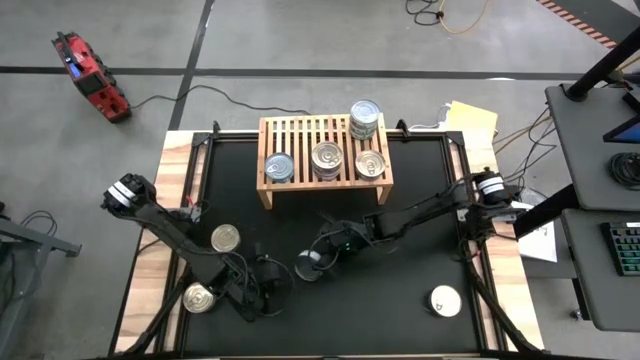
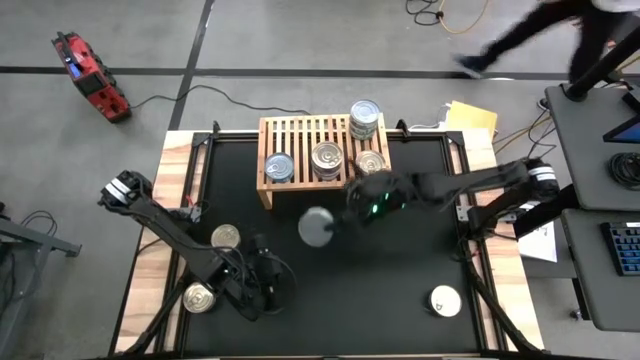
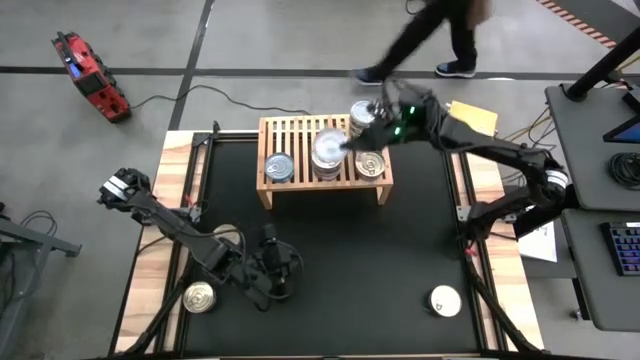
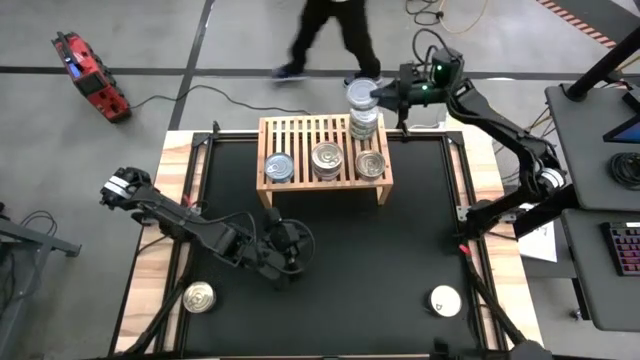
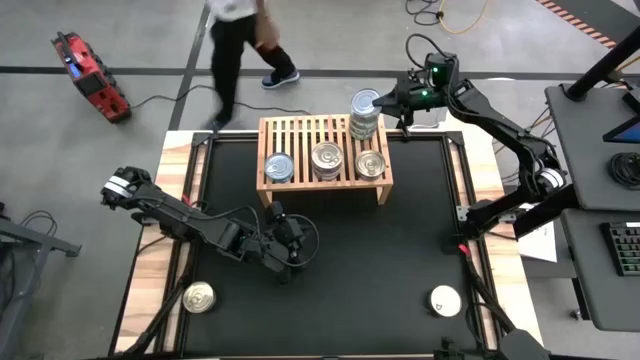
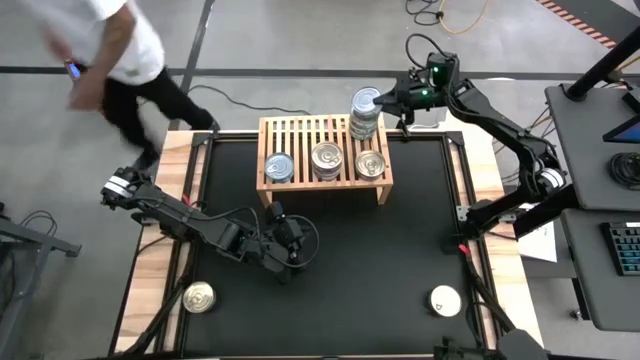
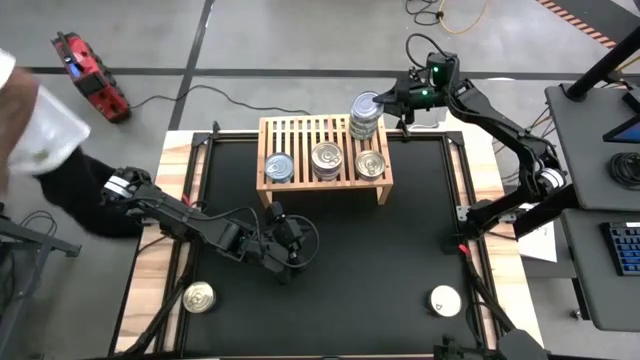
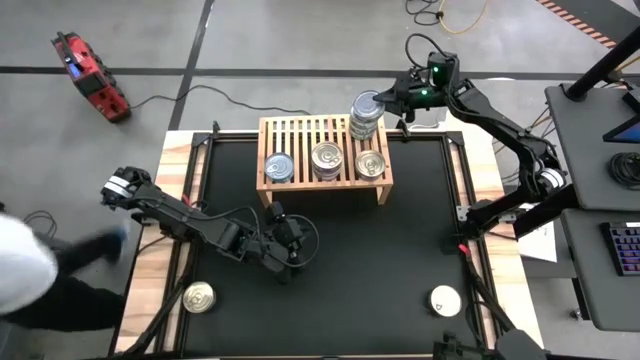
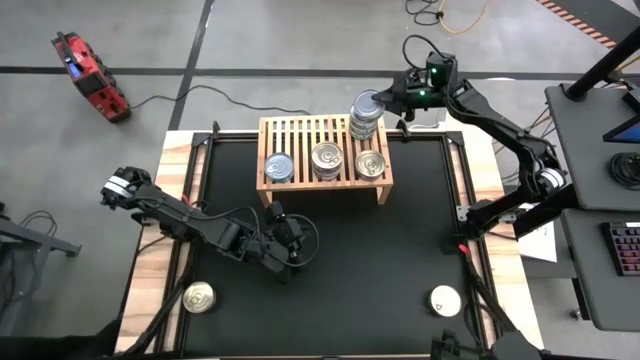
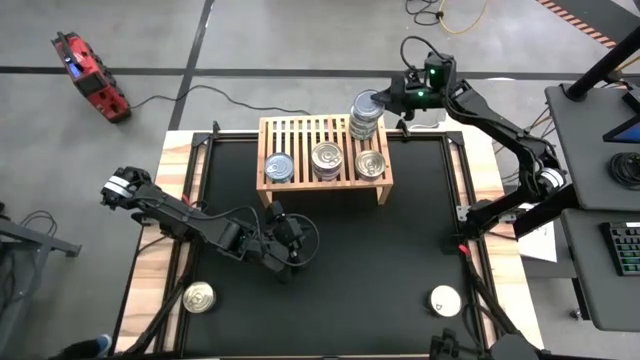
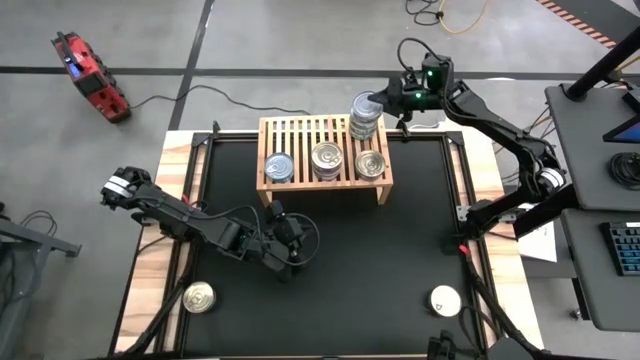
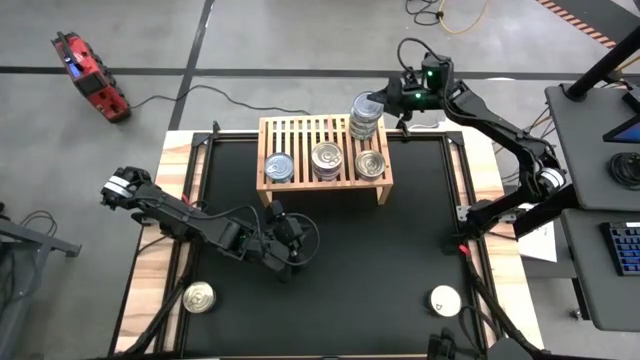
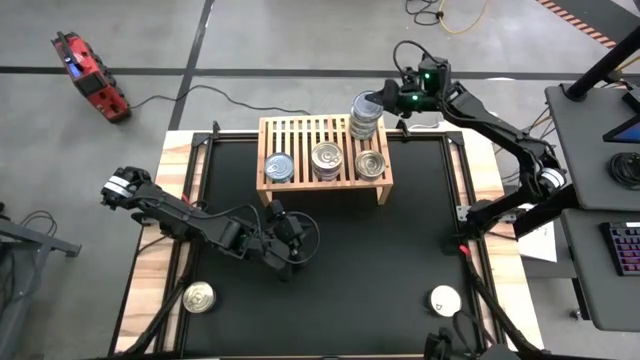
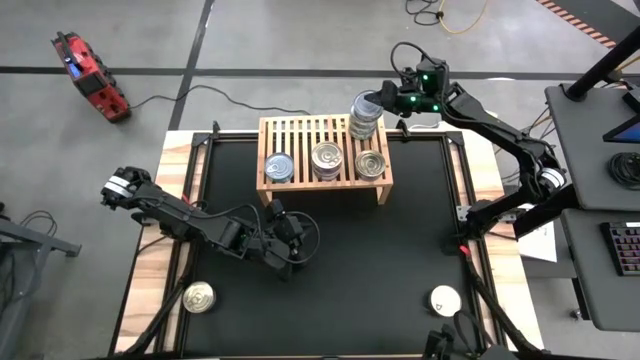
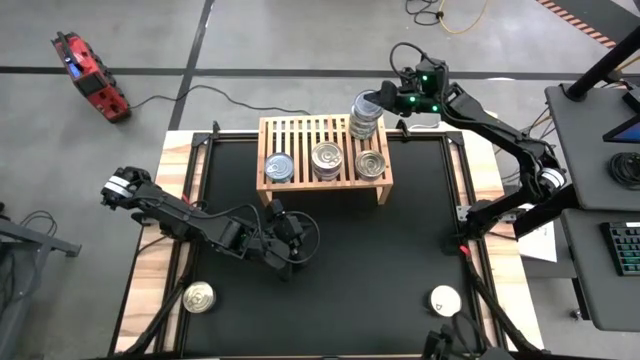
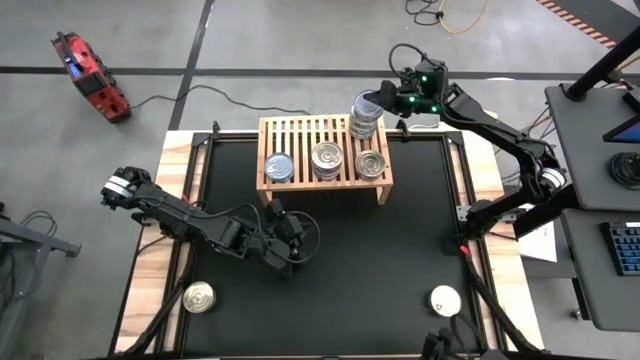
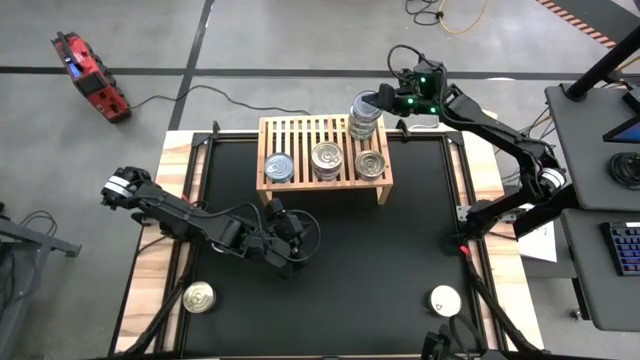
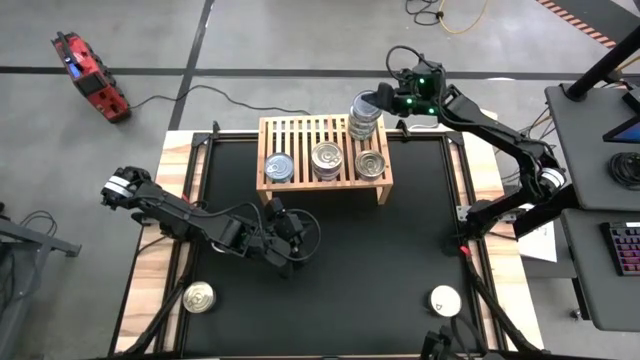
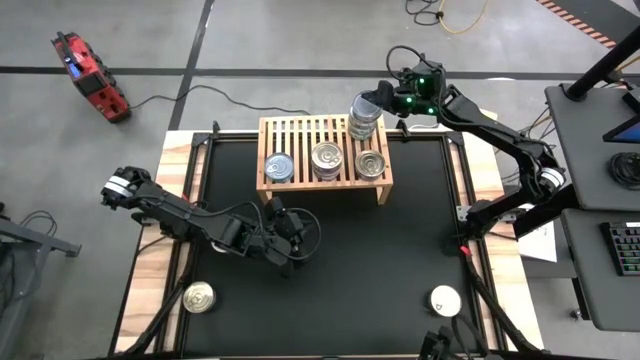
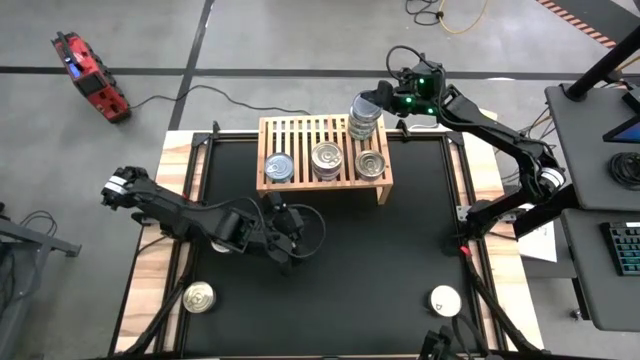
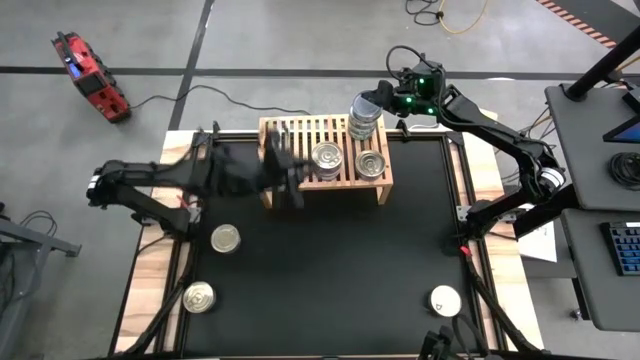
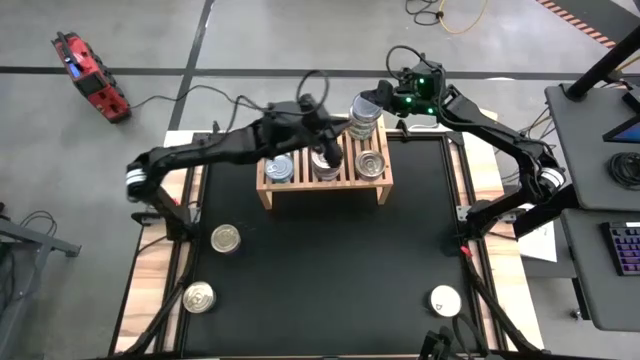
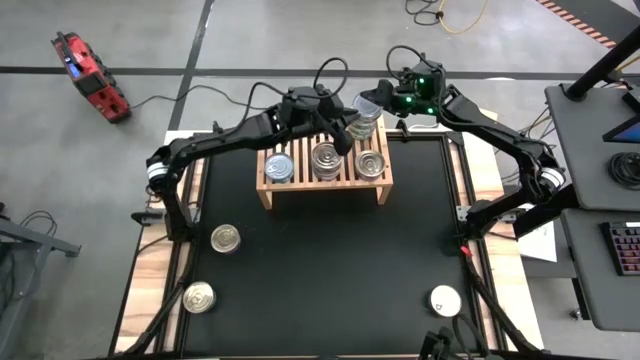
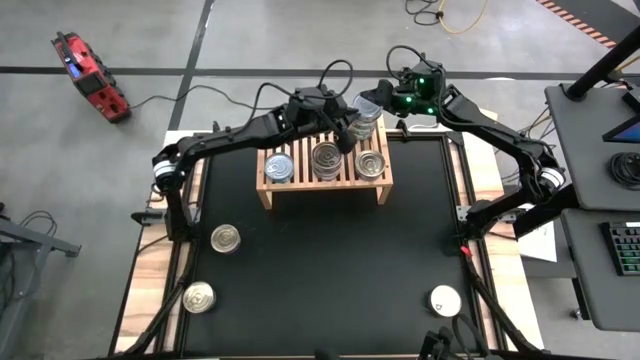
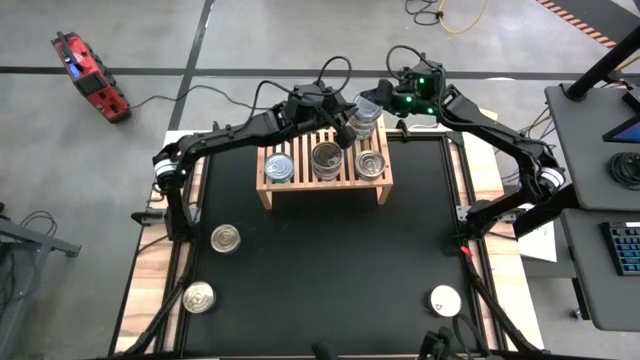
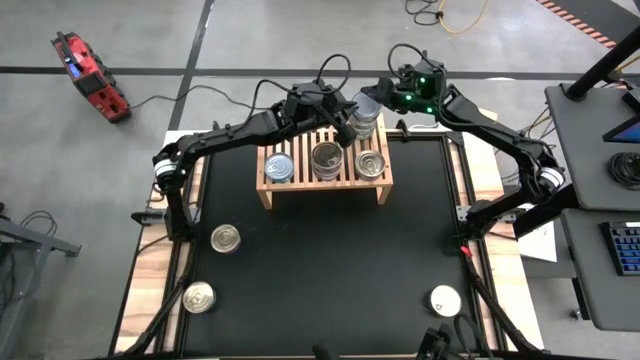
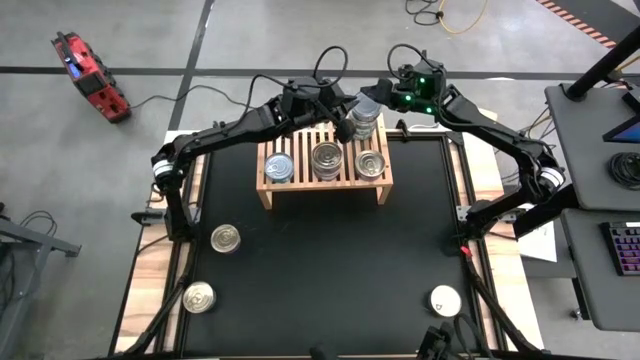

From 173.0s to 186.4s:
Task: Stack canned seafood by type on shelf
Stack the green white tuna can on top of the green white tuna can on the shelf

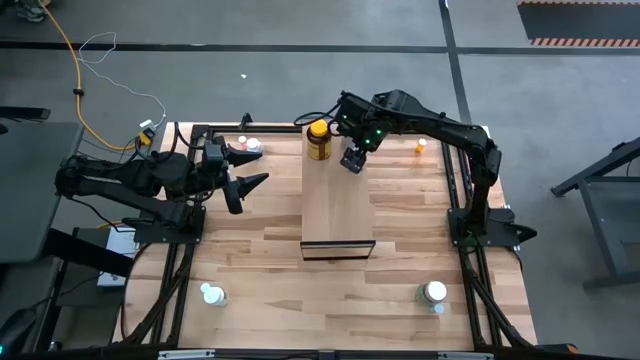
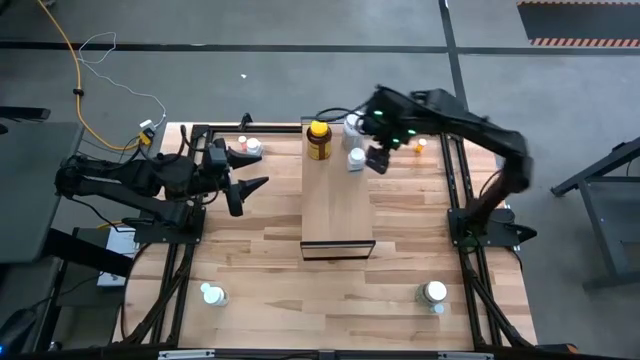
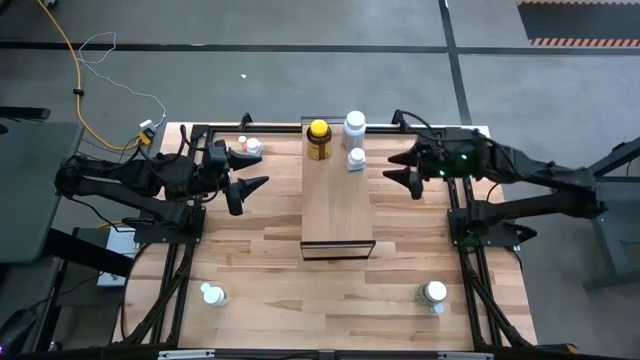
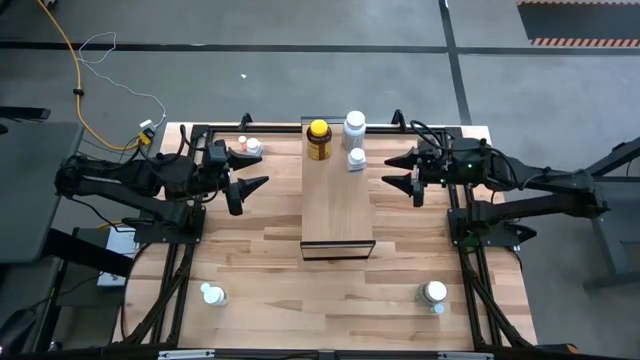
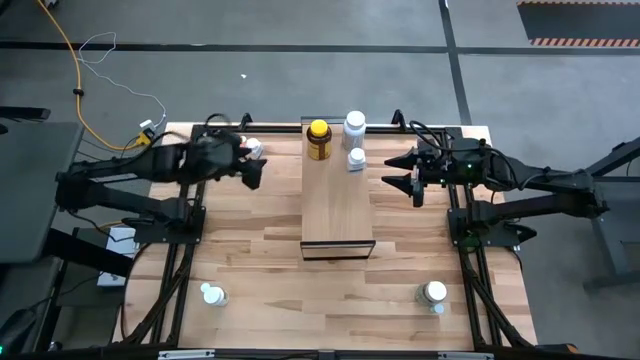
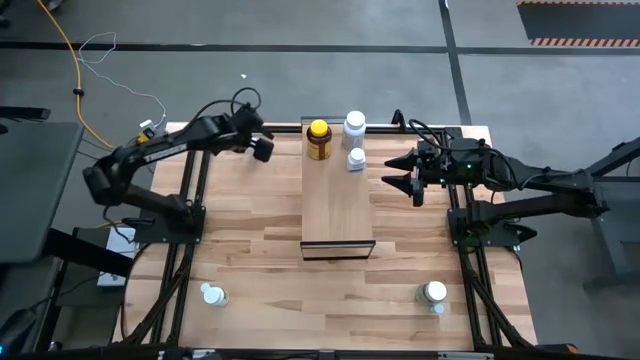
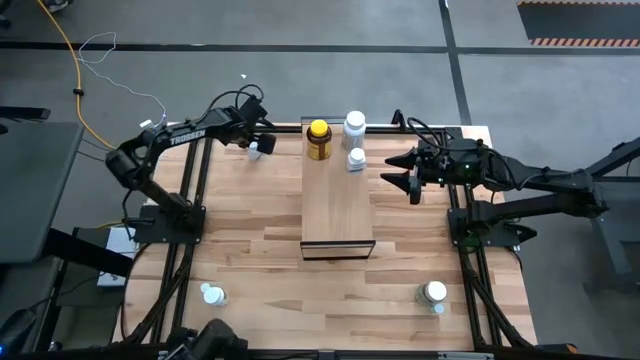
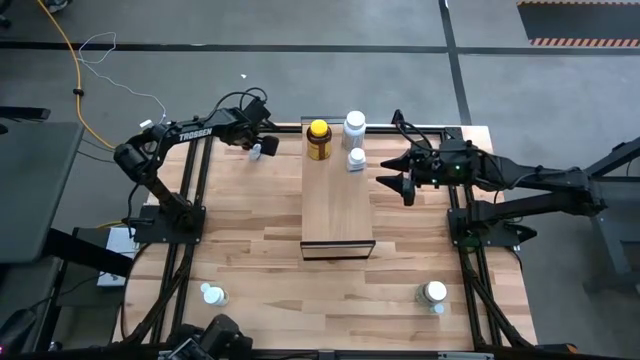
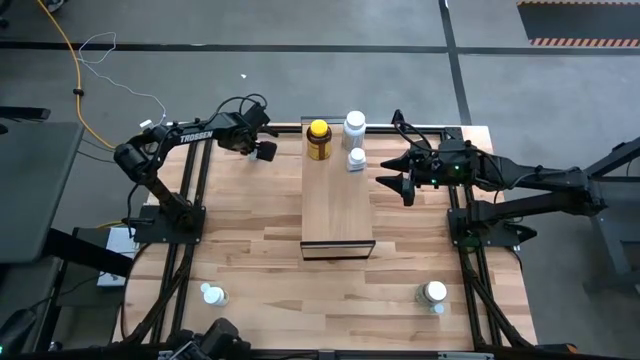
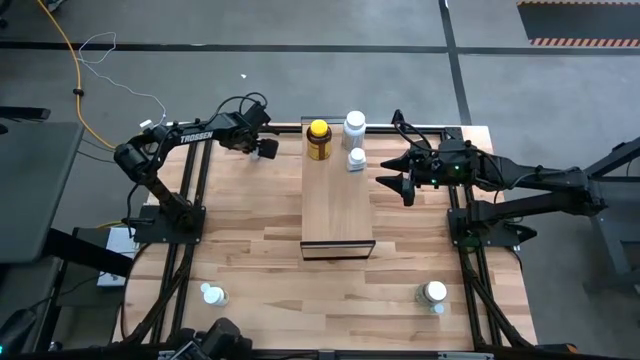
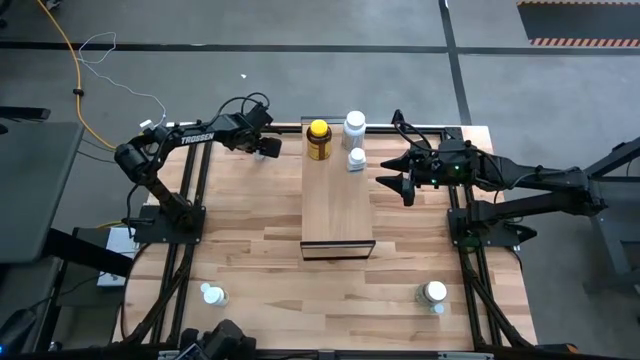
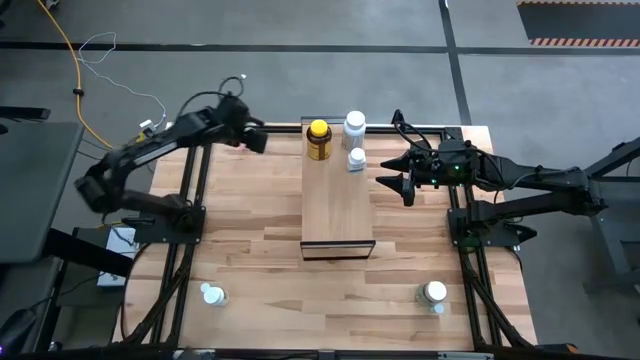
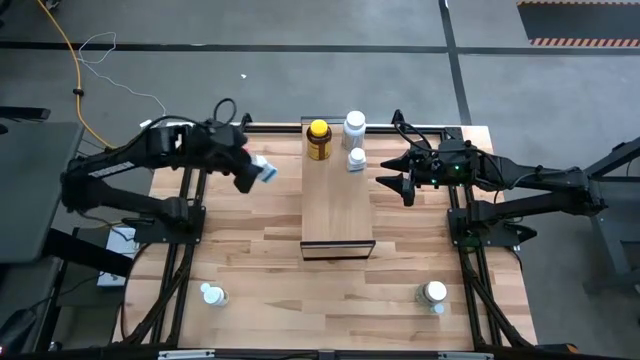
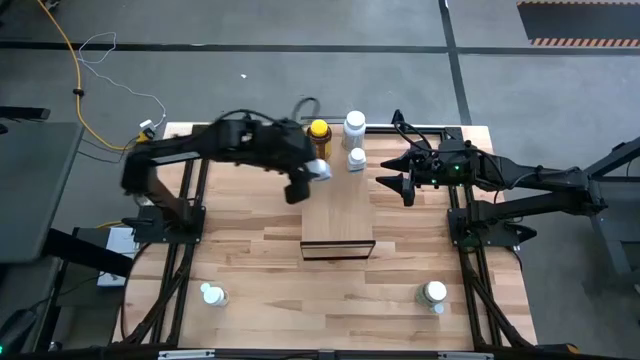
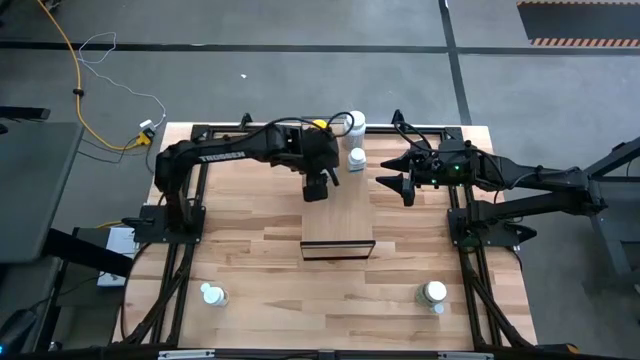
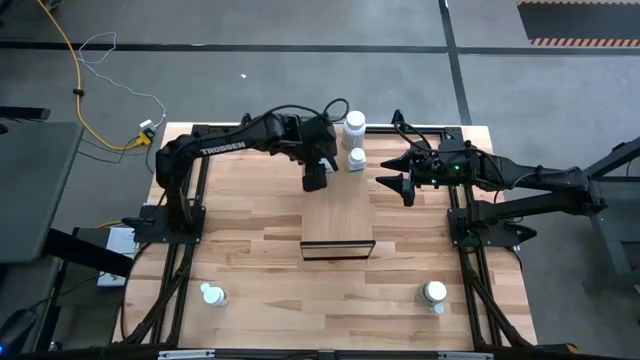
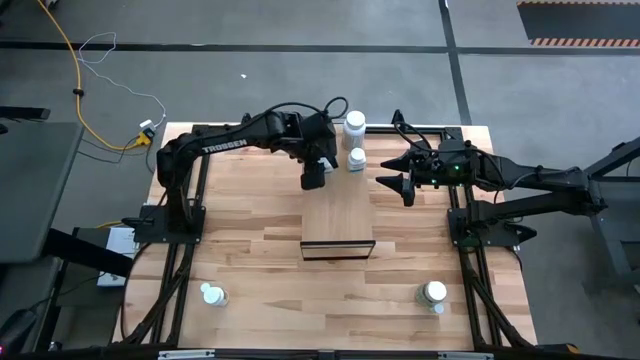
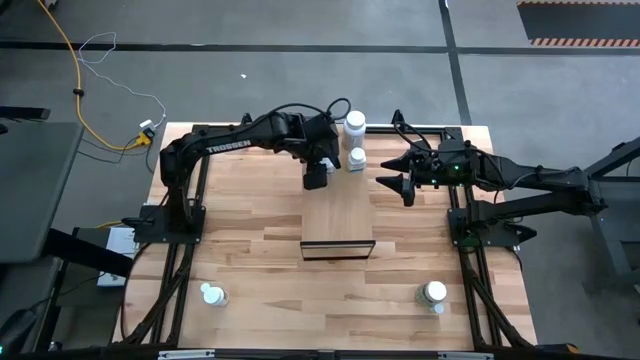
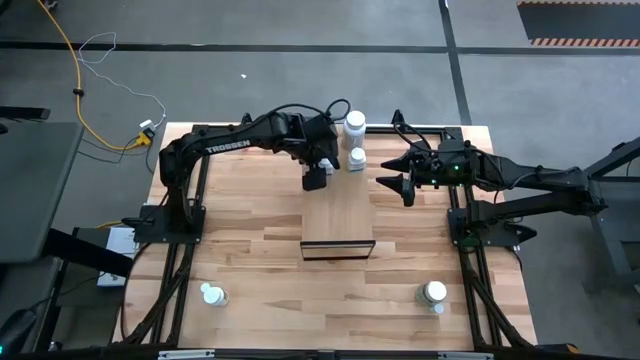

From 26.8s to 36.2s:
Task: Pick and place medicine bottles onto shelf by color
Put the white blue pill bottle on the shelf
